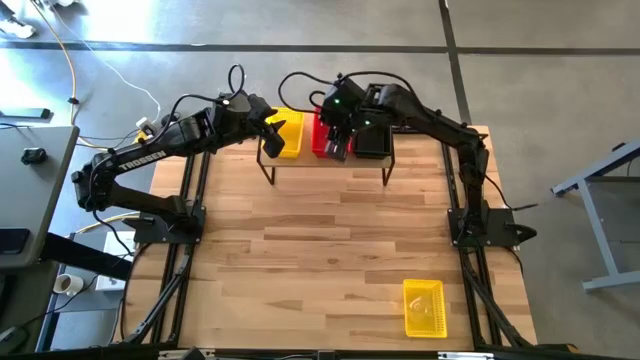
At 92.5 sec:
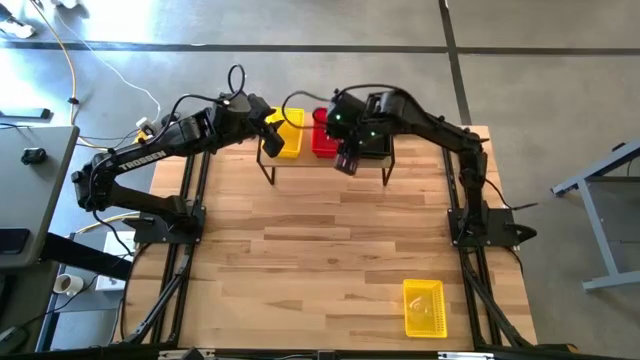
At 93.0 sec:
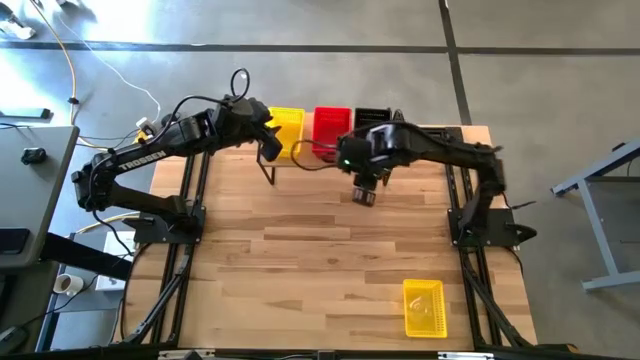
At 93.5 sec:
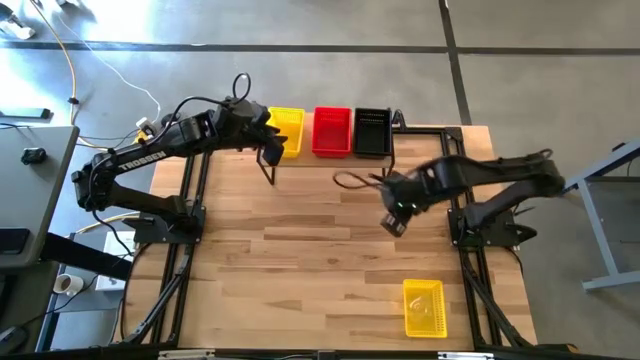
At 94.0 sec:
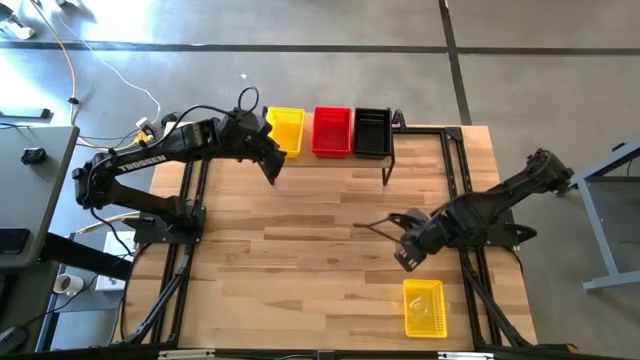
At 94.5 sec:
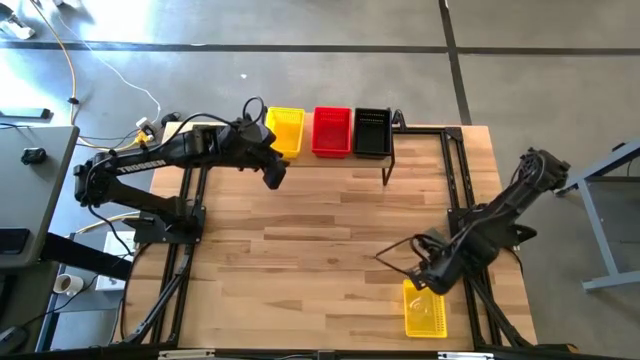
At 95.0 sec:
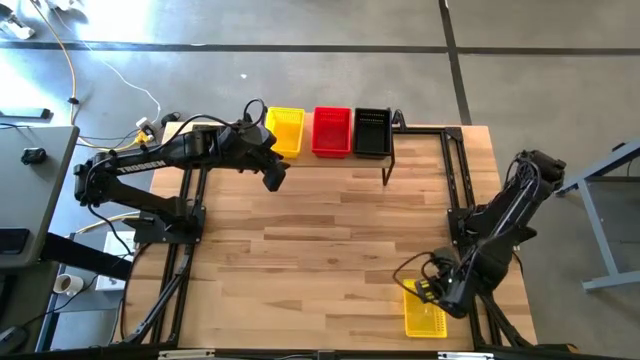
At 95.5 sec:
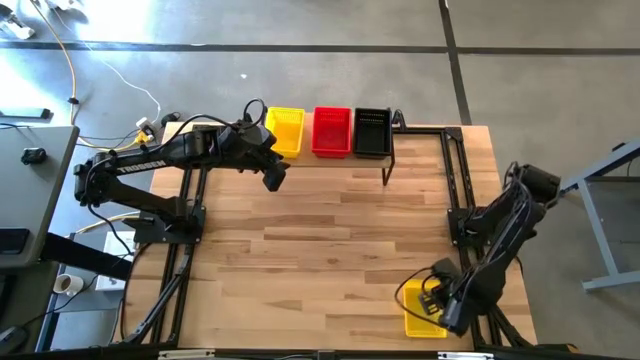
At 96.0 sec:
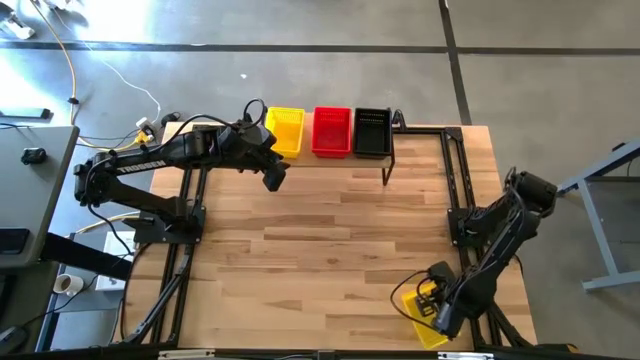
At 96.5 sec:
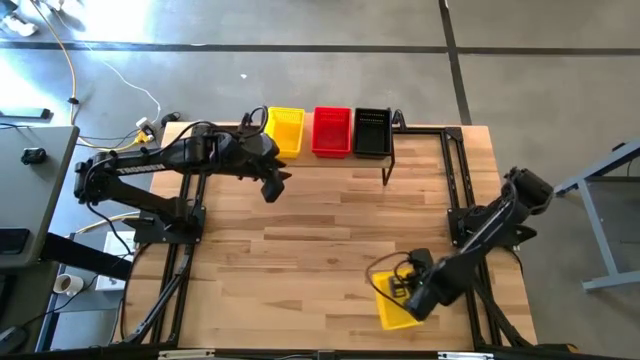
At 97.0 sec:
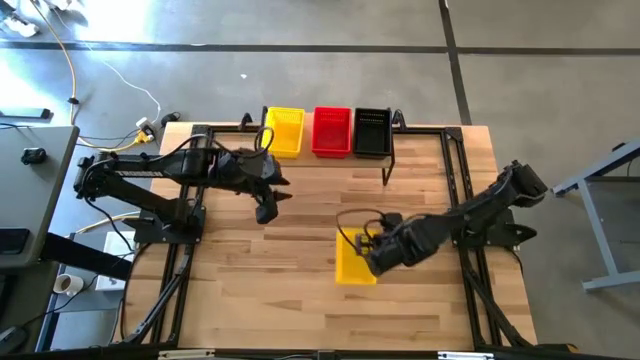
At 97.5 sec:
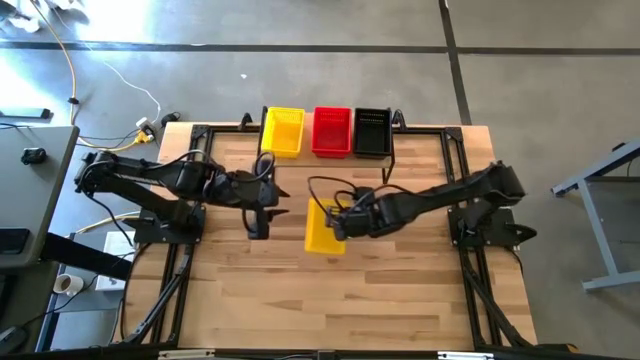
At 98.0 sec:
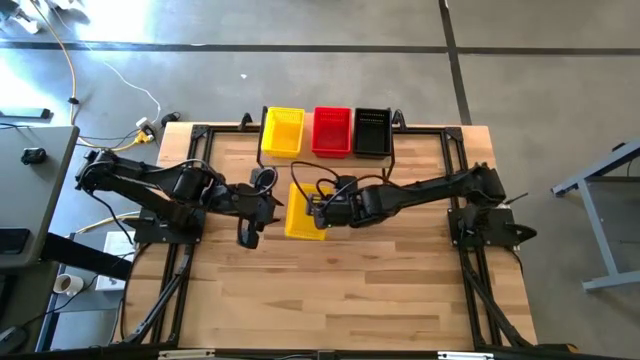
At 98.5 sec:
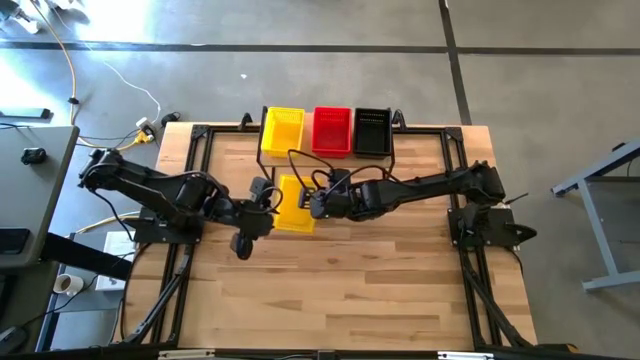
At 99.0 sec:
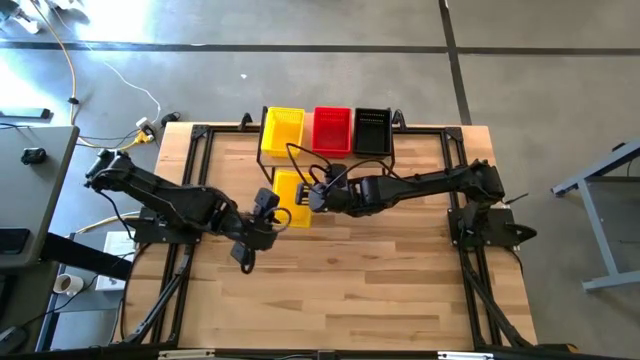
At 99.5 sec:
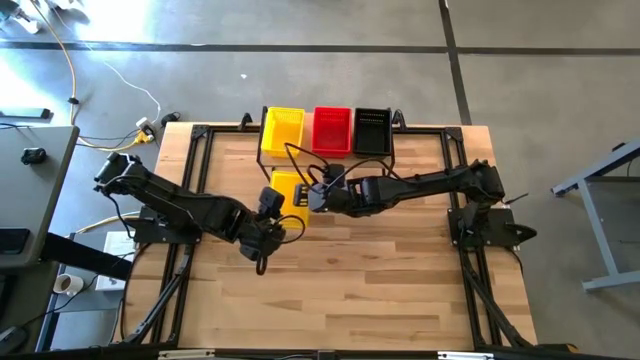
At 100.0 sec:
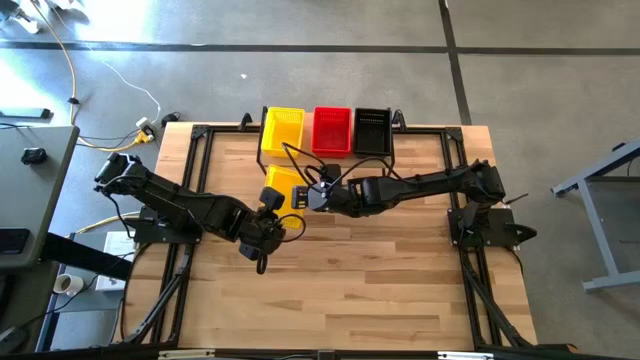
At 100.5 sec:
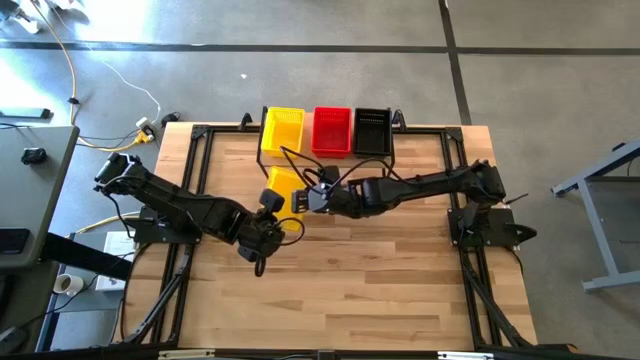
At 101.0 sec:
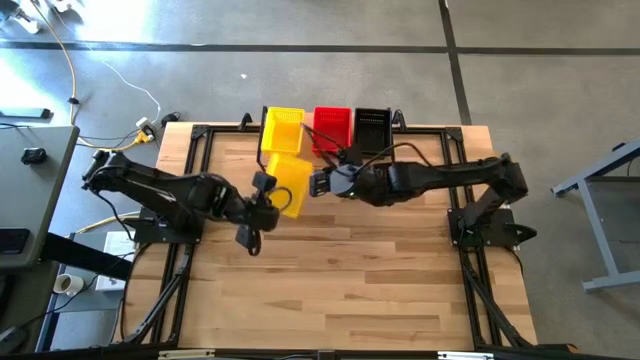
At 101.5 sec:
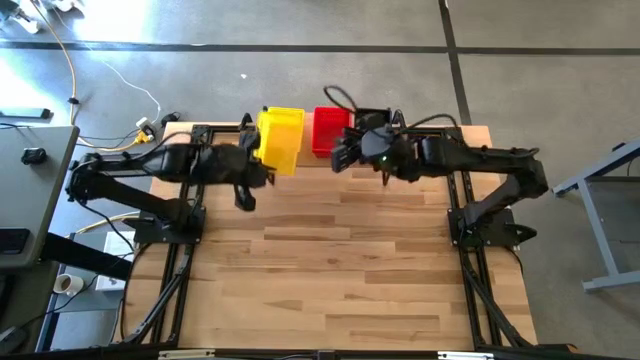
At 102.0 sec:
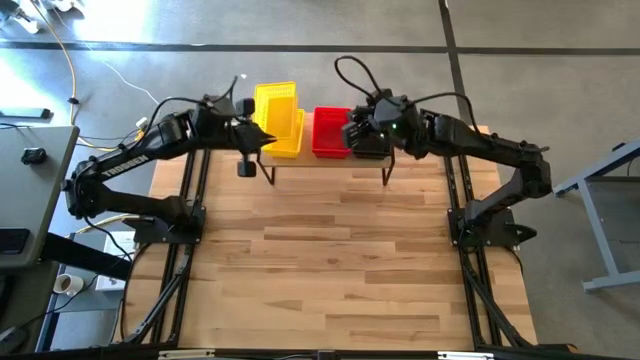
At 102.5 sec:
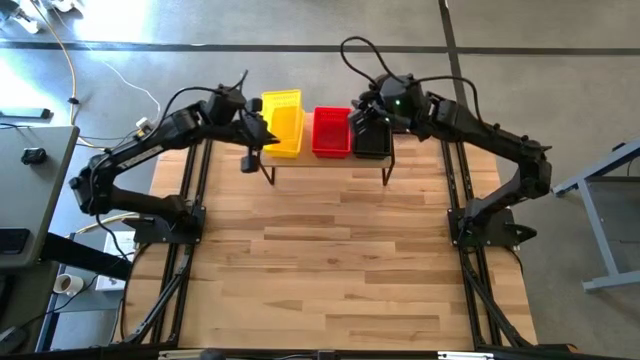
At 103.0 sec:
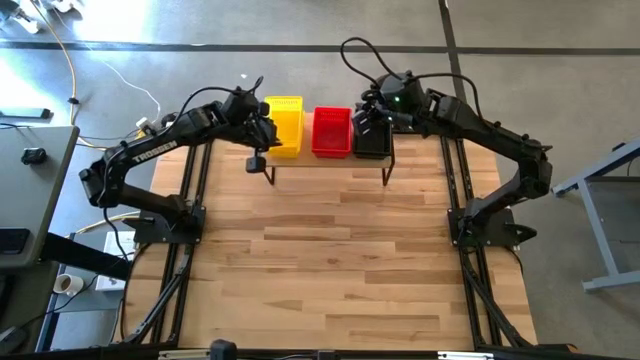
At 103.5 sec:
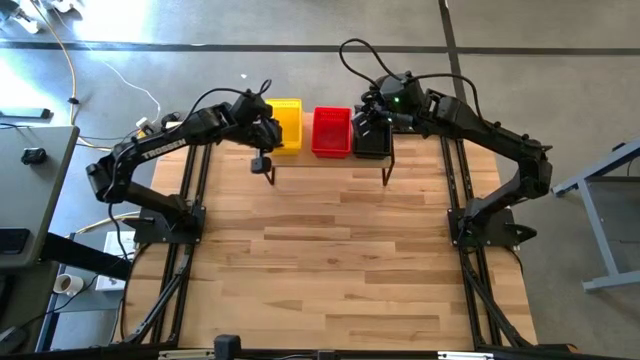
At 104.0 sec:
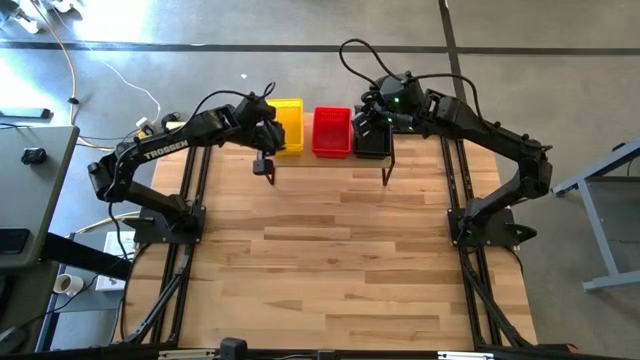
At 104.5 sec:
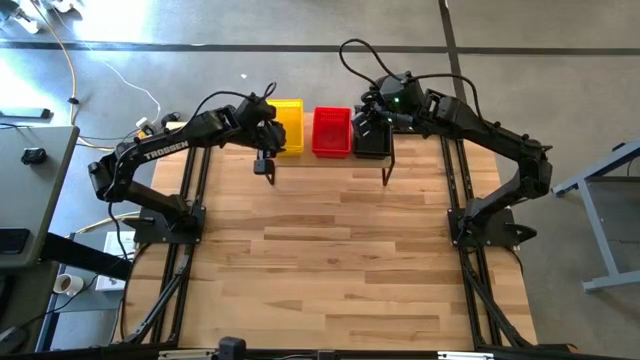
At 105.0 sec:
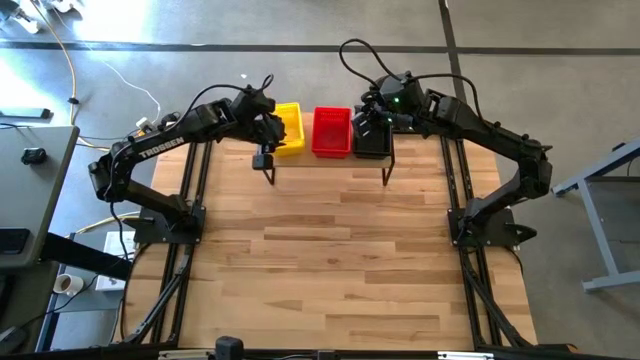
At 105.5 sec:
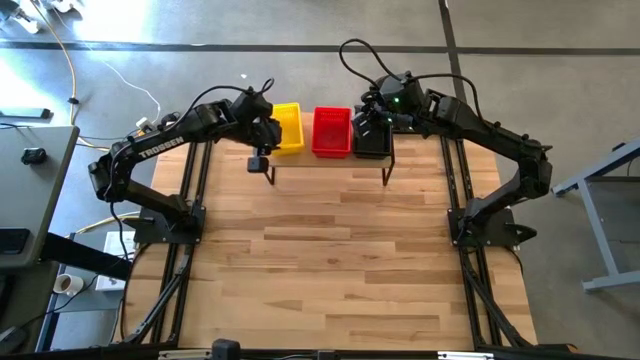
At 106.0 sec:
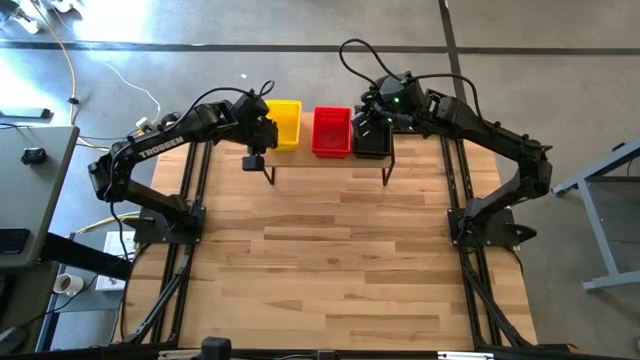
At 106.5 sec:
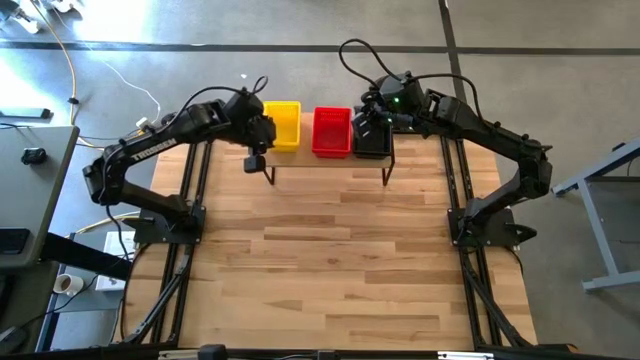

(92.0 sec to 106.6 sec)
Task: Stack baskets on shelf by color
Stack the yellow bin on the stacked yellow bins on the shelf

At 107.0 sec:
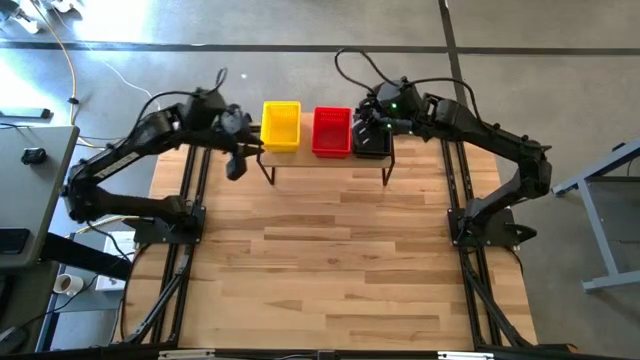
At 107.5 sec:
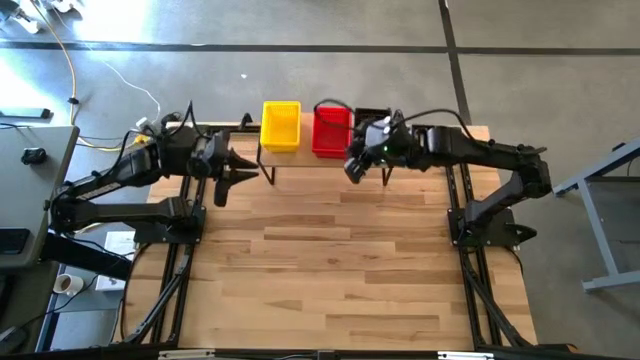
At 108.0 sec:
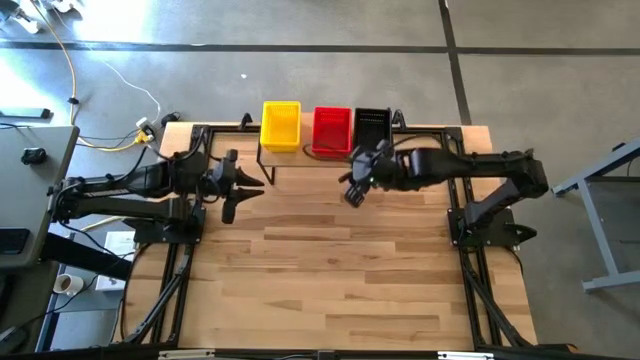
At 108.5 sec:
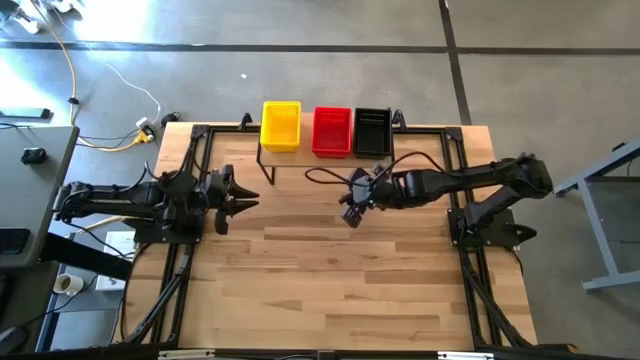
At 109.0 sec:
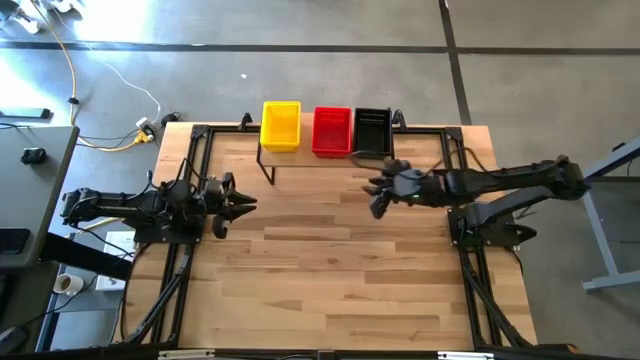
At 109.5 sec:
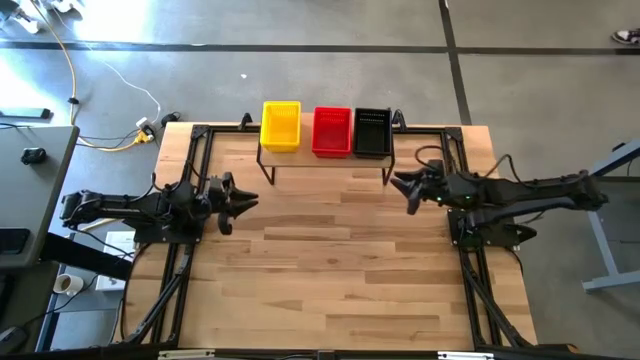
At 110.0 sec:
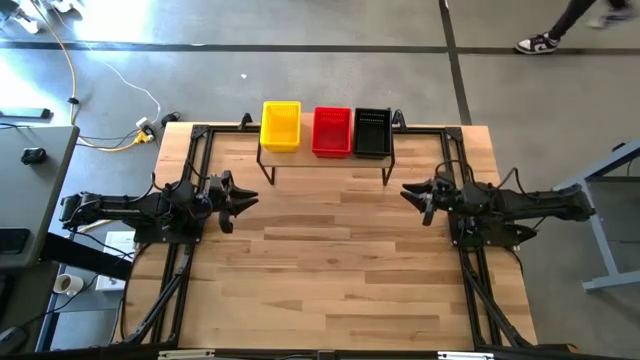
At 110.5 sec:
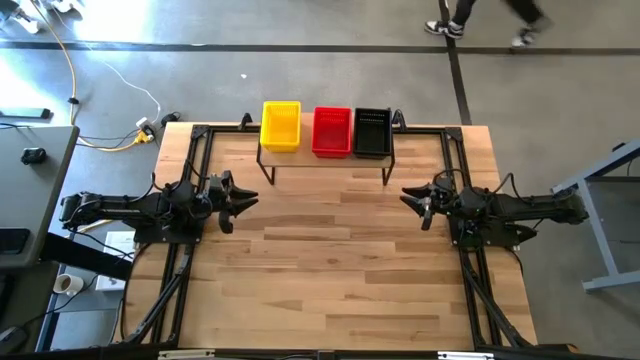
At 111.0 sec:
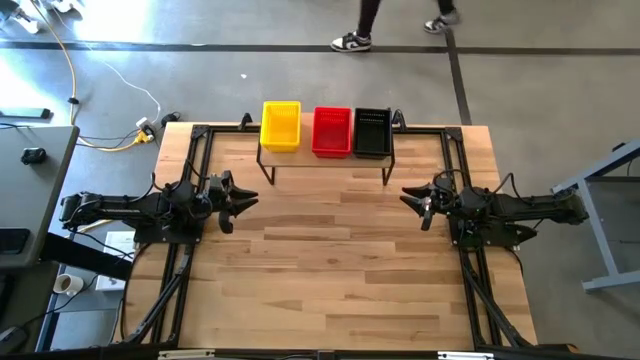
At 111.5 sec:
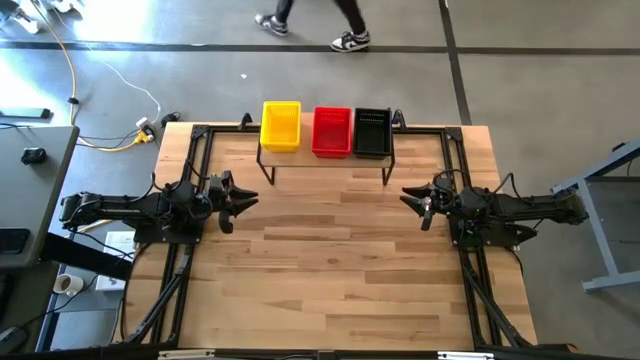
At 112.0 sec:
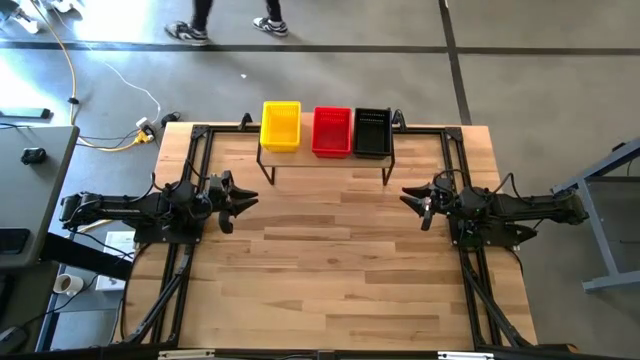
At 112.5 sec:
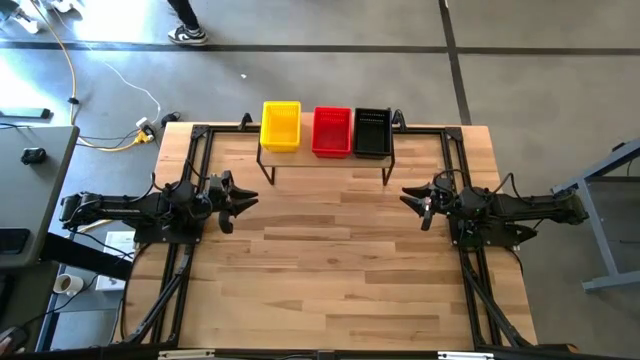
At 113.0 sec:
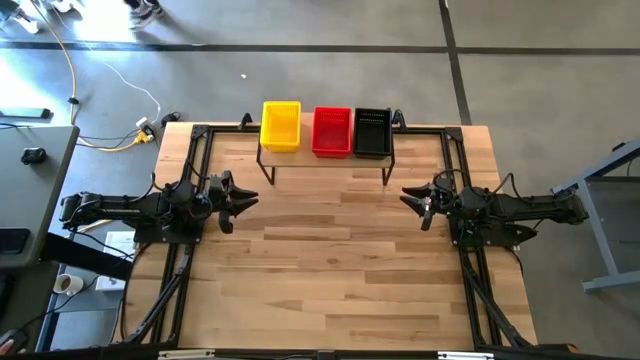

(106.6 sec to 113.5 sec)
Return to Home Position
